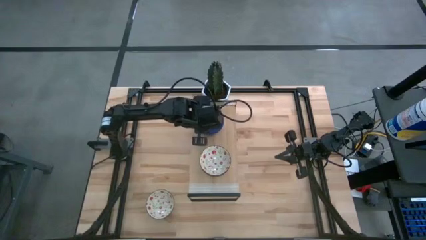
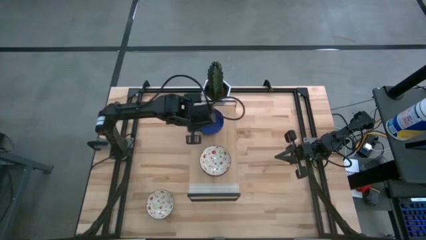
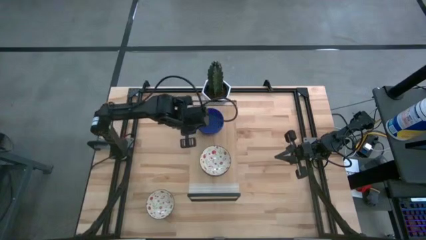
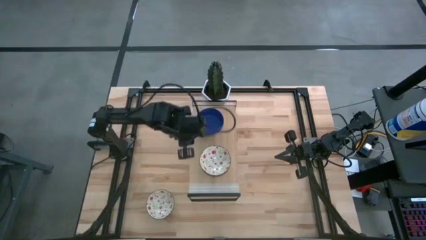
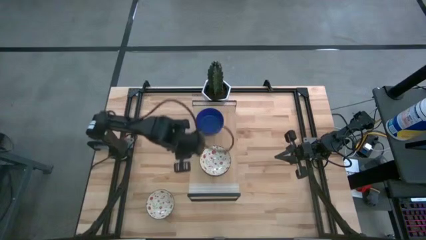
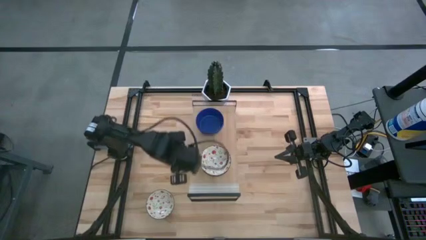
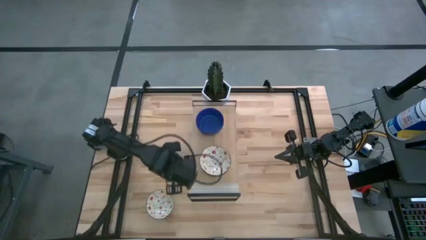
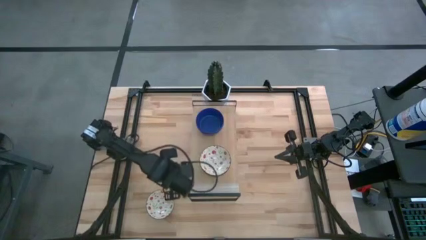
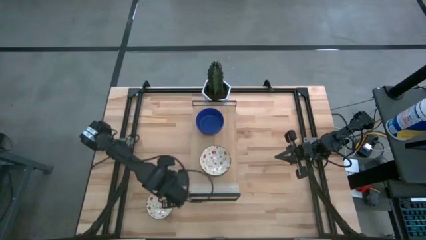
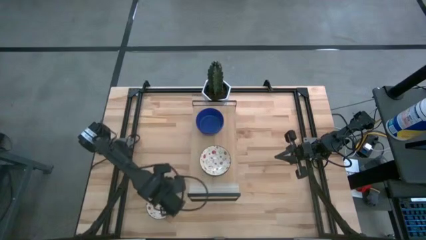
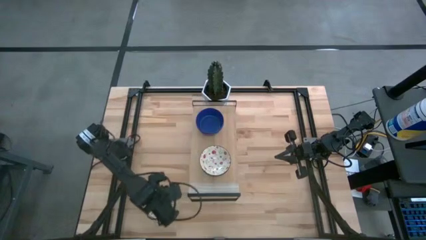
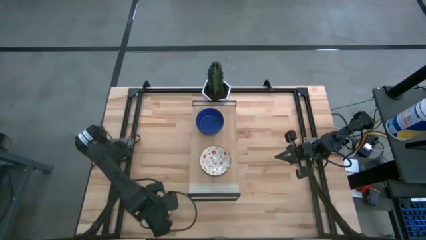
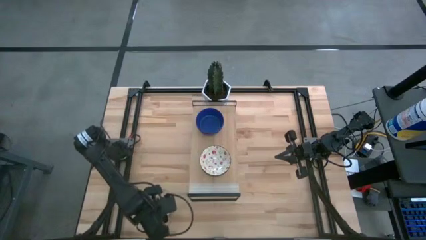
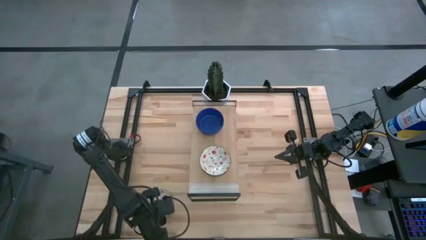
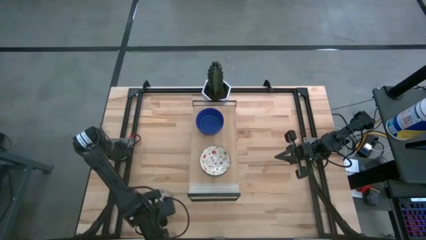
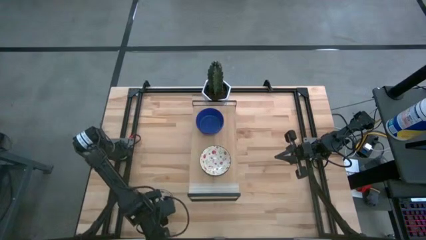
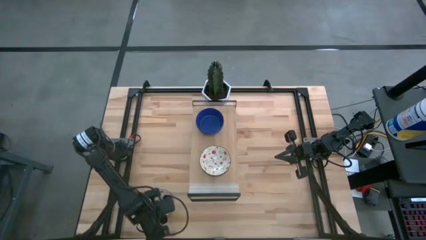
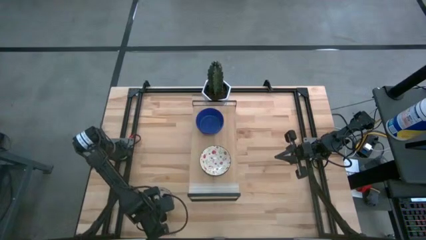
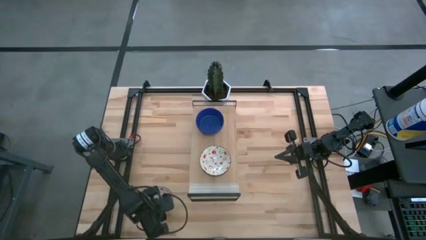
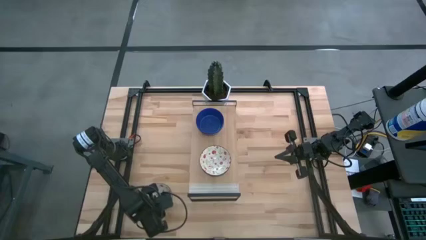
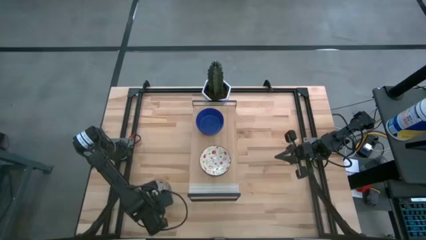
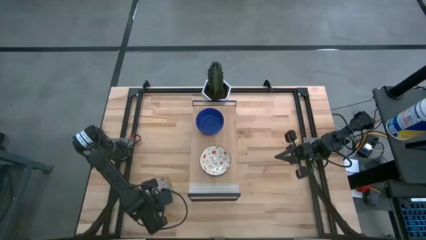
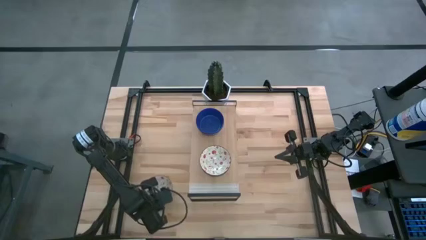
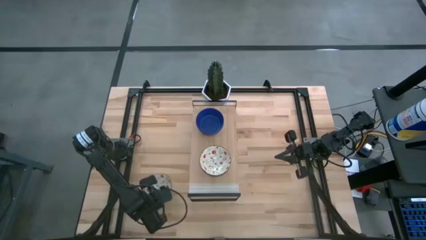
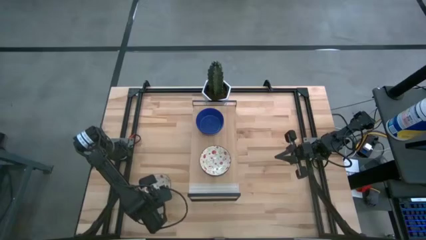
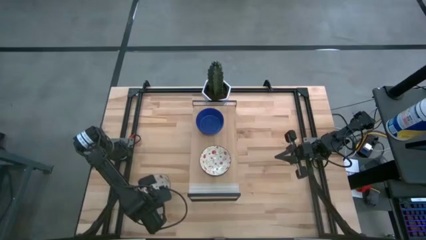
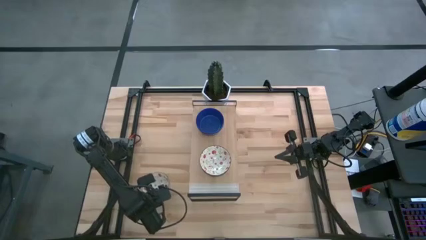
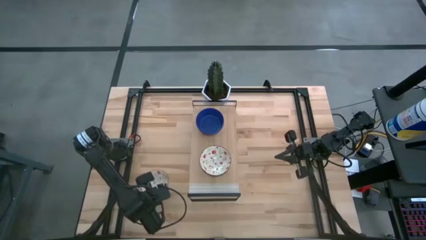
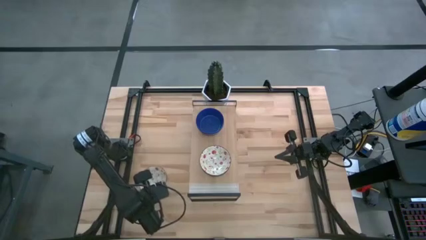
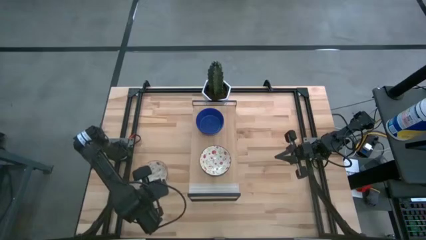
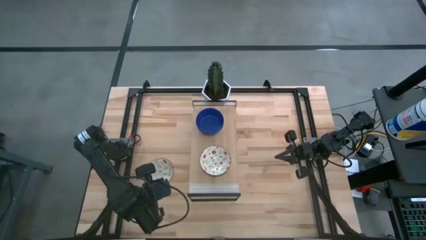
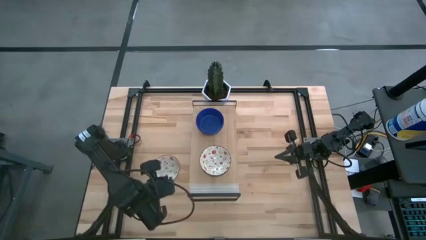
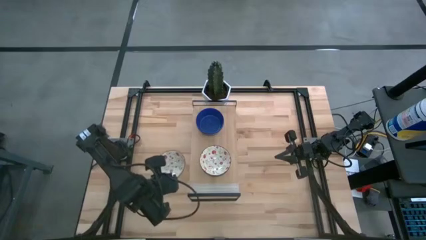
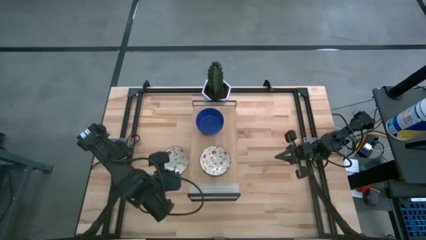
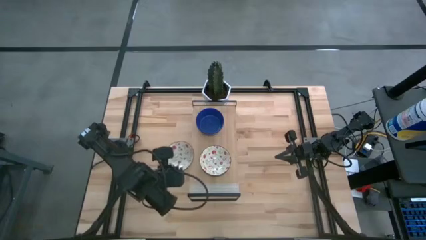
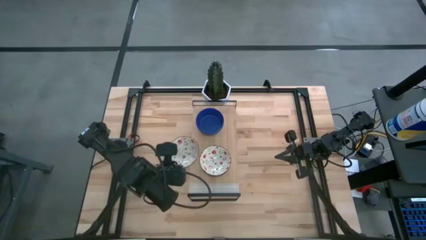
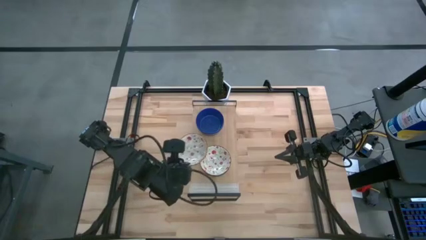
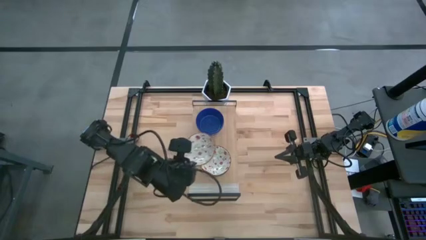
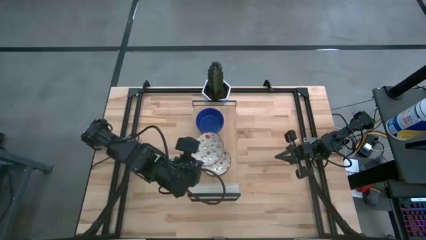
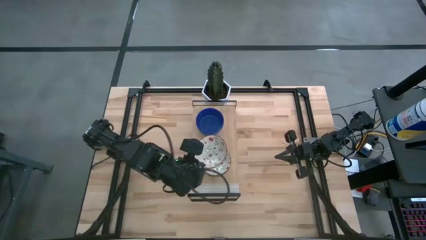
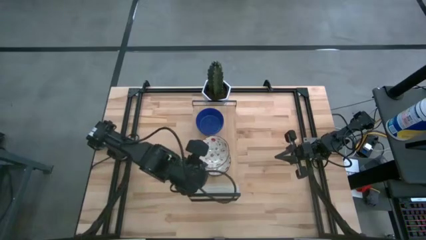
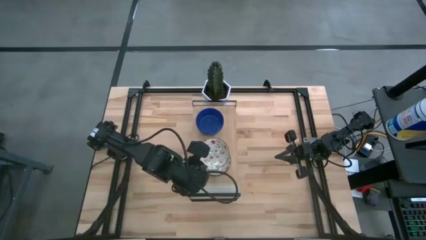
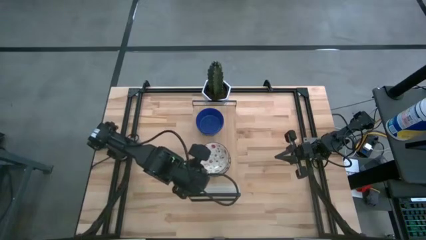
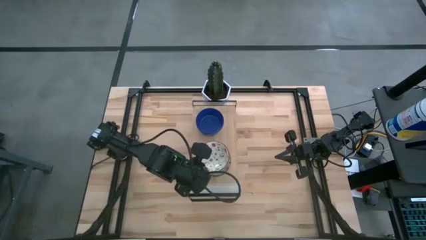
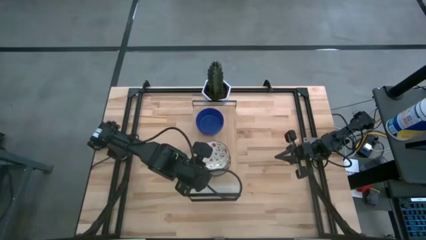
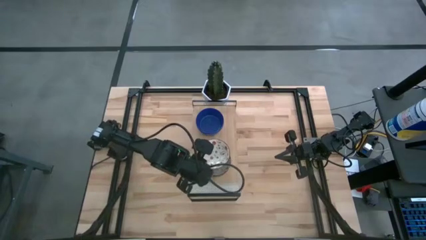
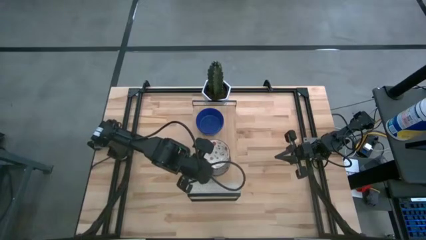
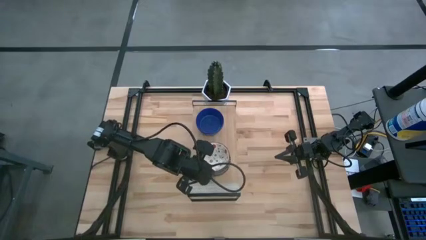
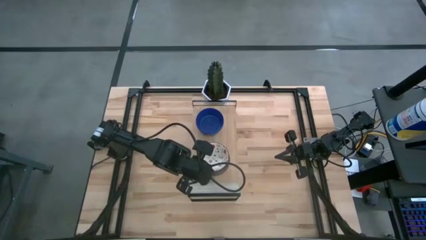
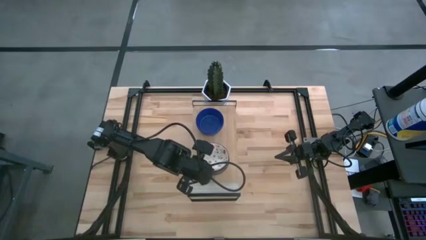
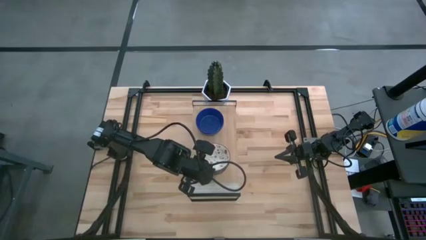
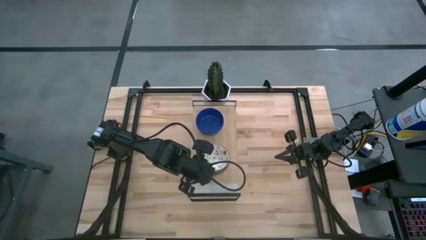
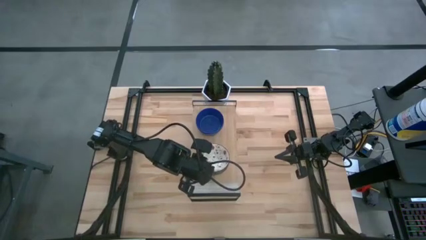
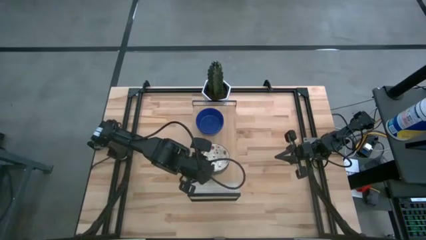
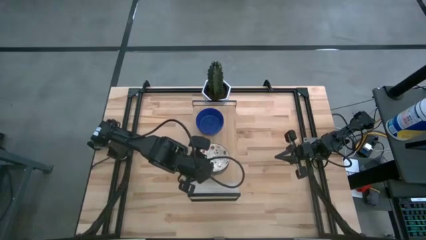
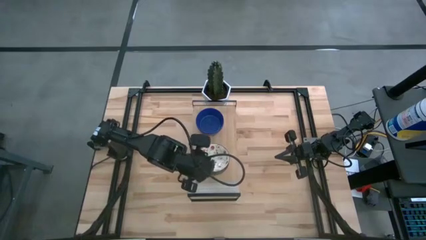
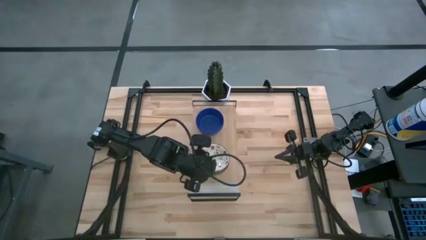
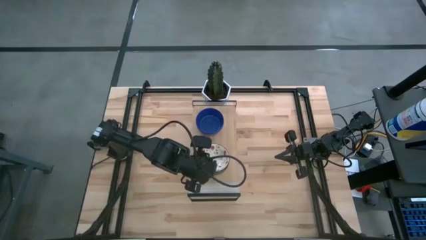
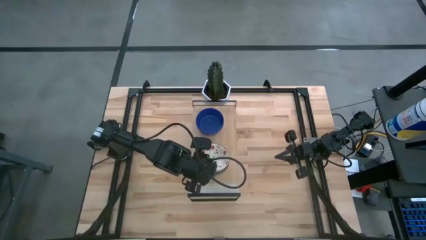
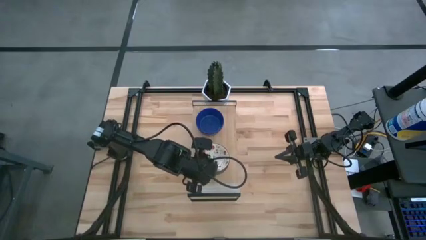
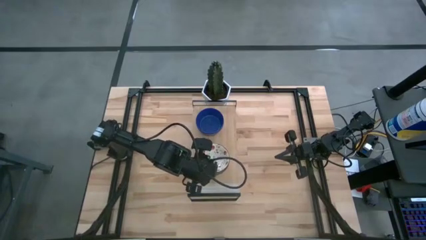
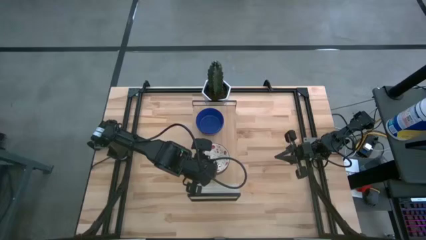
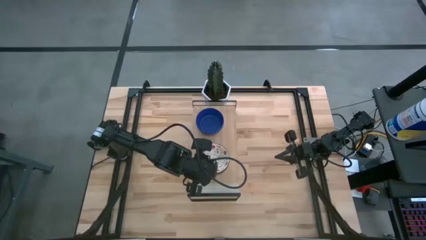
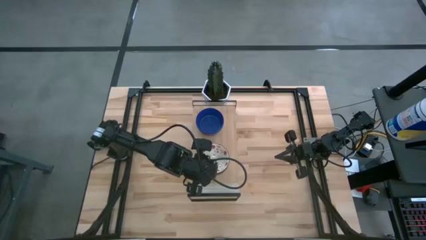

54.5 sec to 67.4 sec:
Task: Pick & Place Mini bowls
Stack the white patterned bowl on top of the white patterned bowls on the shelf

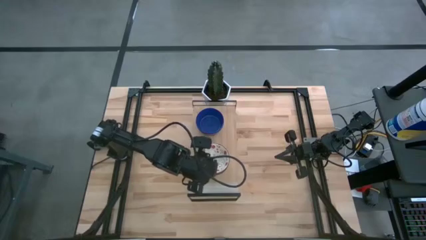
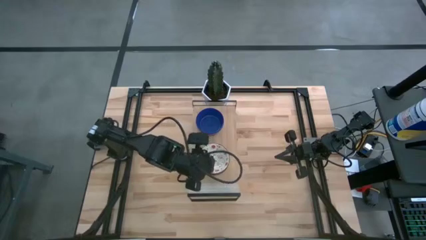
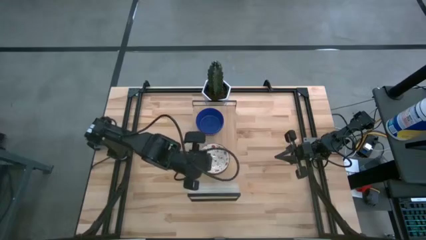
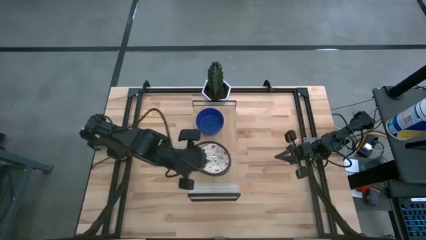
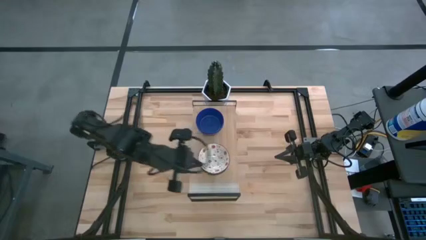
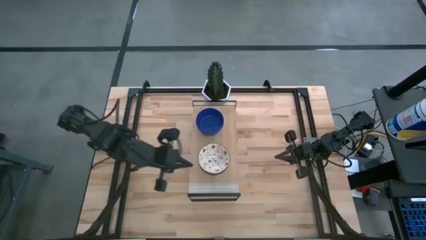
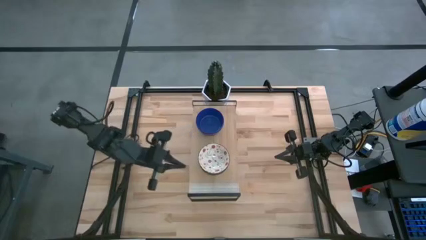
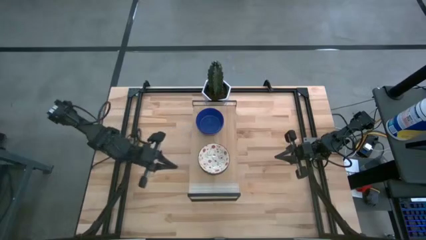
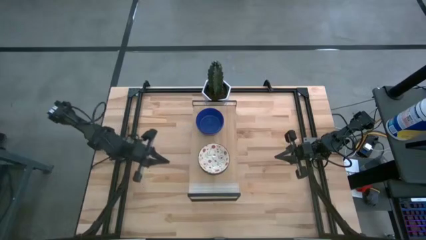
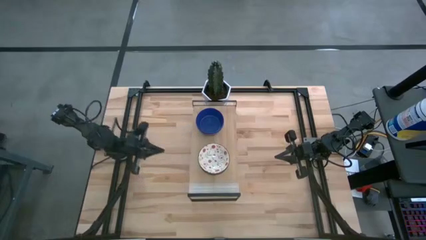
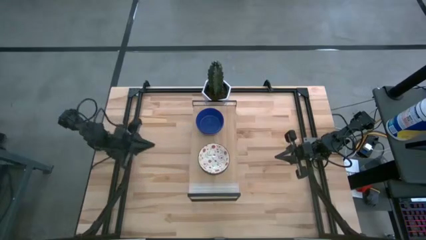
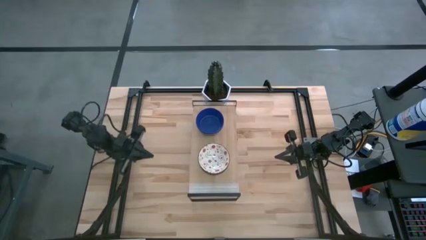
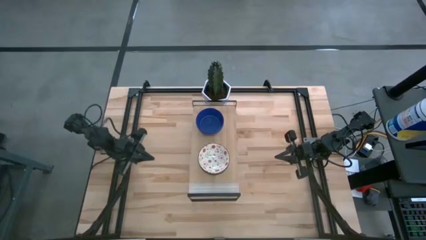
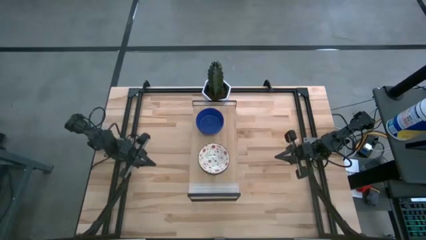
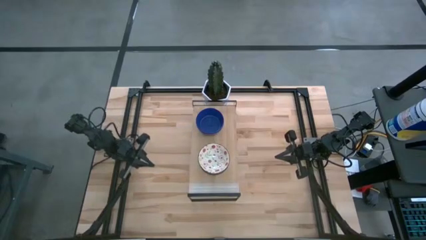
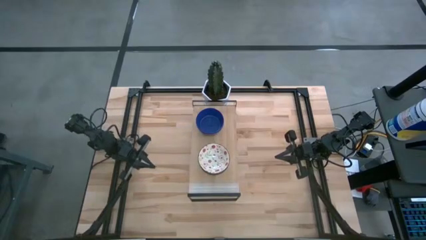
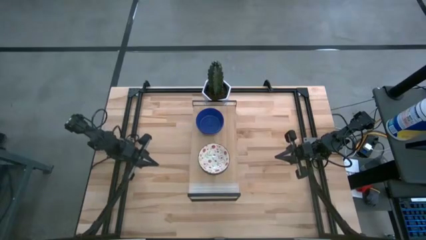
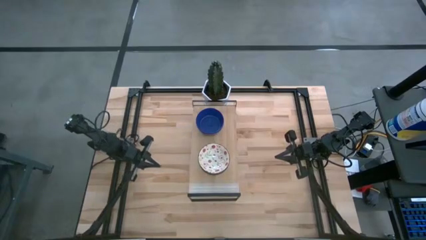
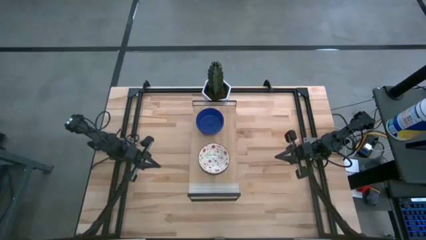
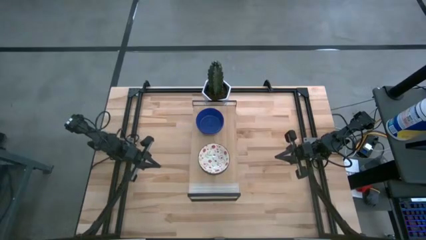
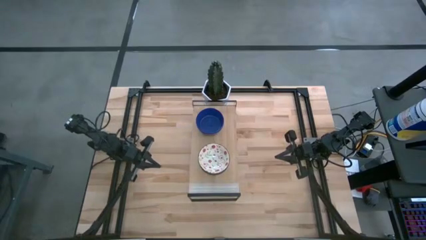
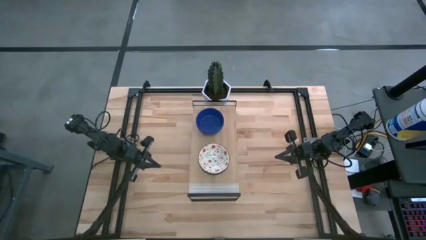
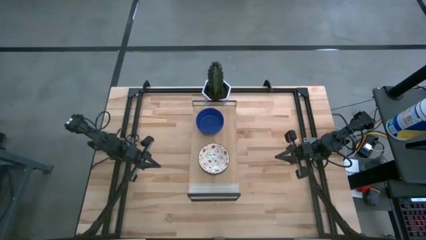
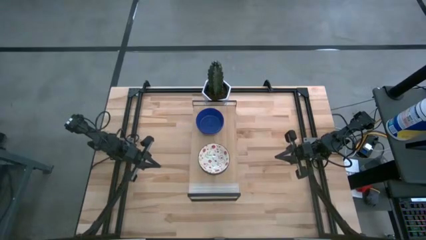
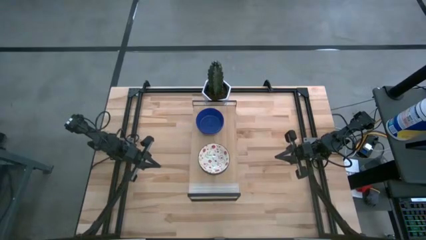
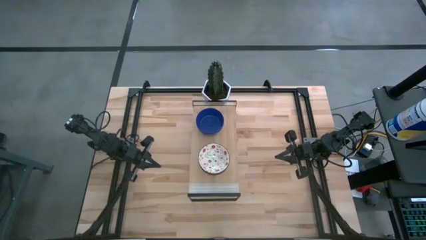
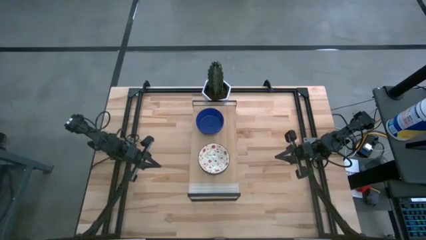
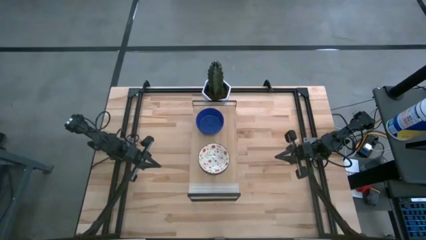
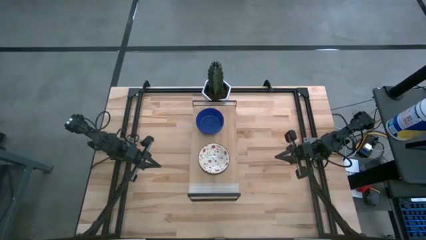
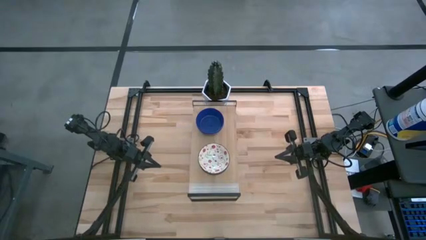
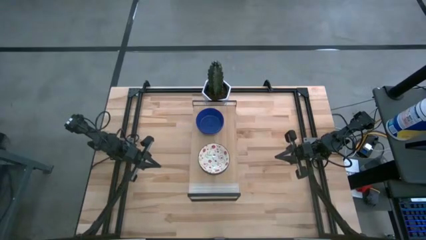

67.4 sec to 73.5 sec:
Return to Home Position
